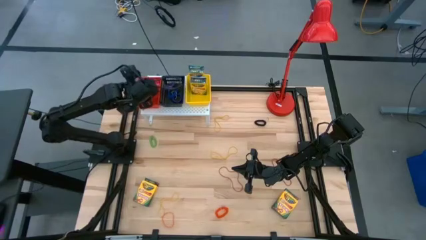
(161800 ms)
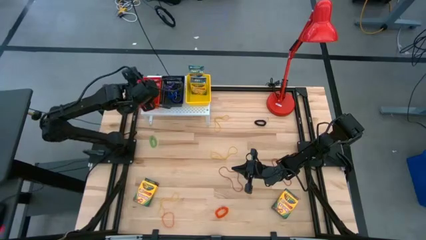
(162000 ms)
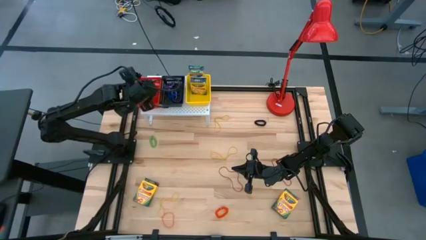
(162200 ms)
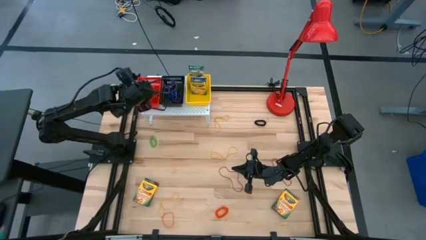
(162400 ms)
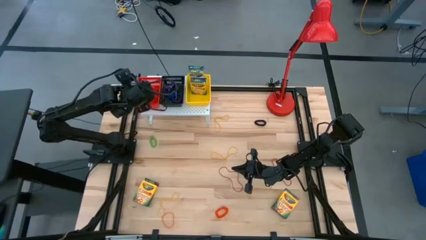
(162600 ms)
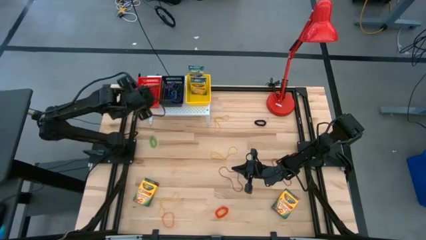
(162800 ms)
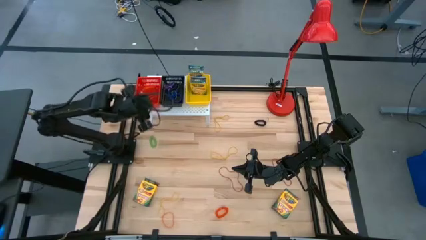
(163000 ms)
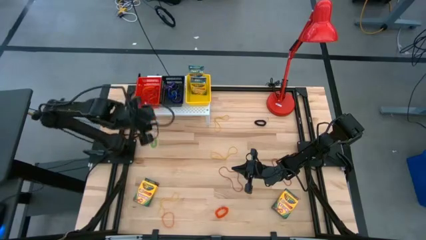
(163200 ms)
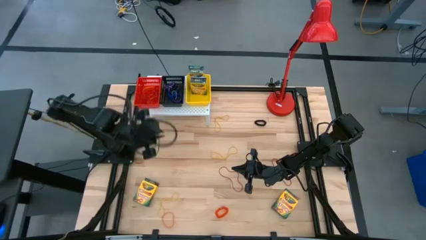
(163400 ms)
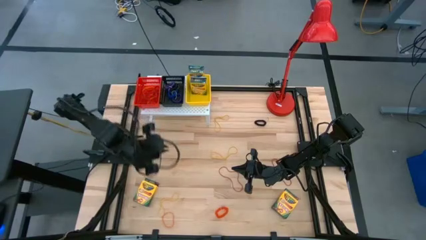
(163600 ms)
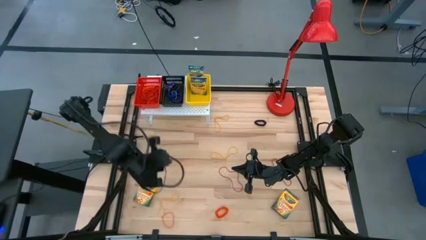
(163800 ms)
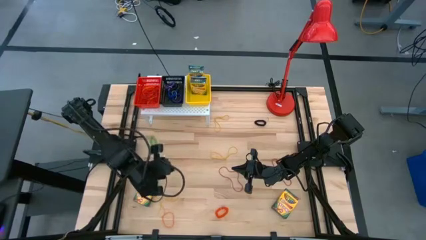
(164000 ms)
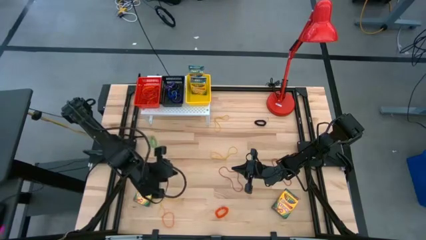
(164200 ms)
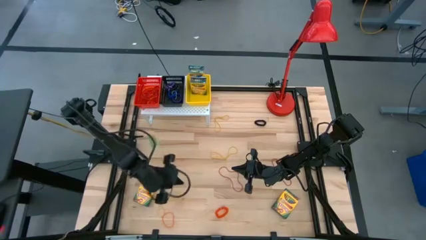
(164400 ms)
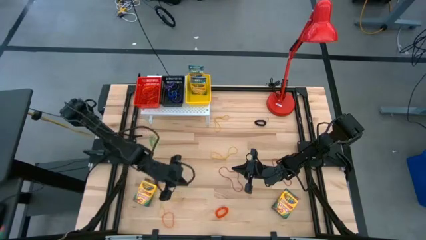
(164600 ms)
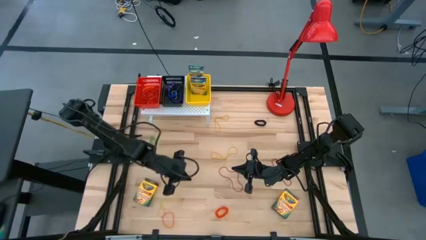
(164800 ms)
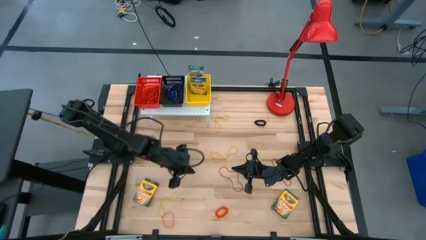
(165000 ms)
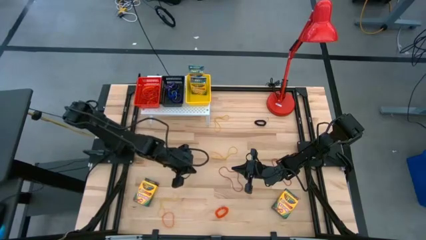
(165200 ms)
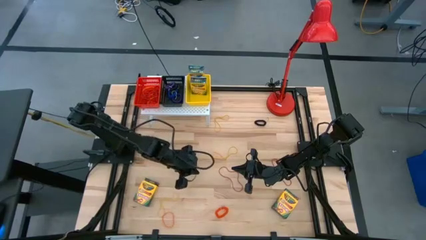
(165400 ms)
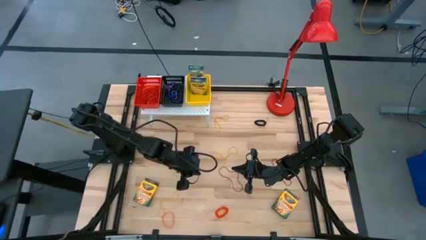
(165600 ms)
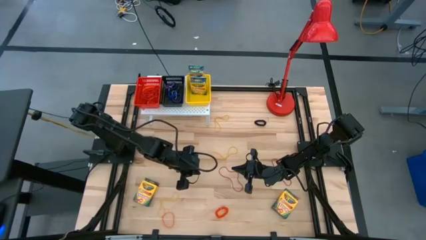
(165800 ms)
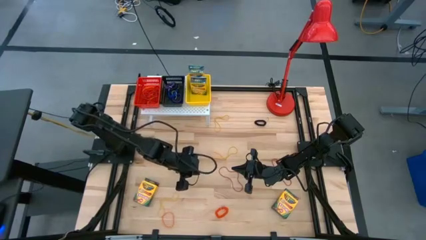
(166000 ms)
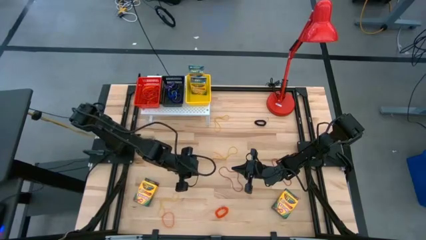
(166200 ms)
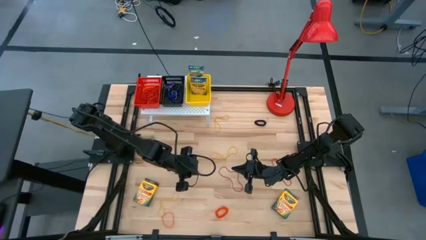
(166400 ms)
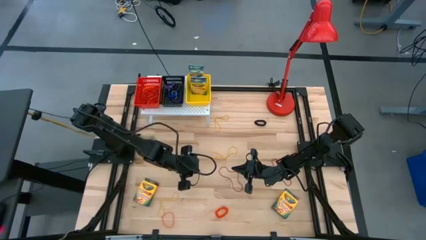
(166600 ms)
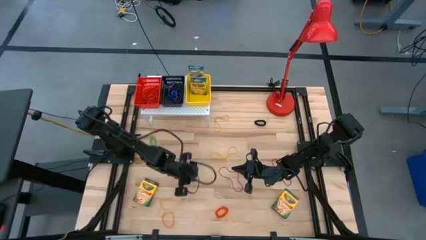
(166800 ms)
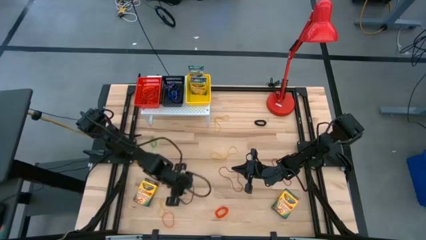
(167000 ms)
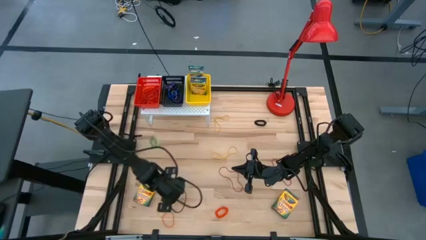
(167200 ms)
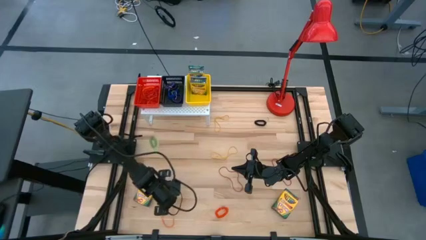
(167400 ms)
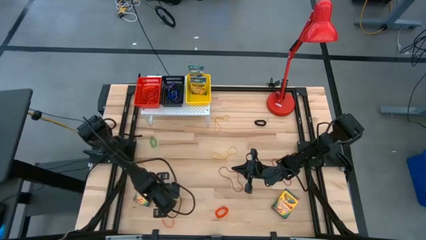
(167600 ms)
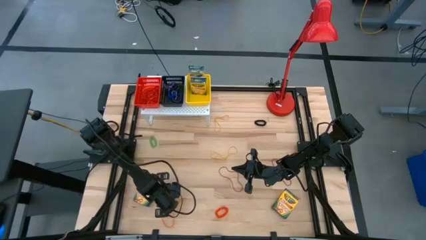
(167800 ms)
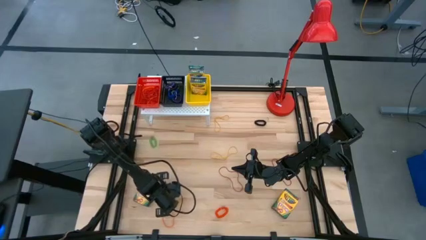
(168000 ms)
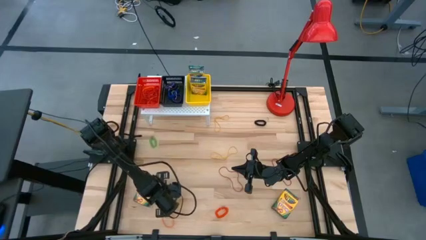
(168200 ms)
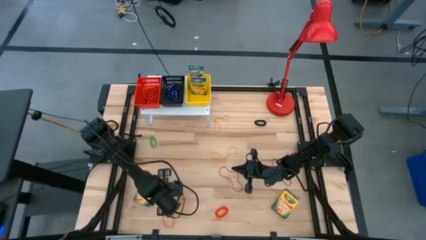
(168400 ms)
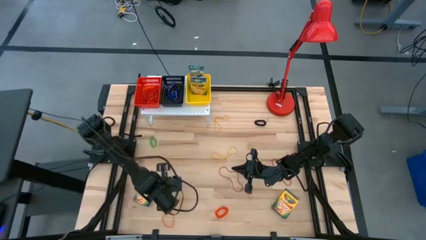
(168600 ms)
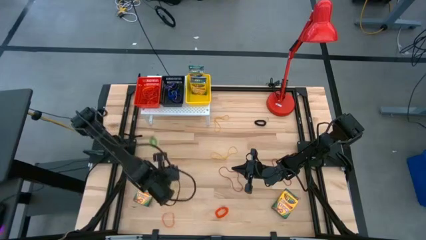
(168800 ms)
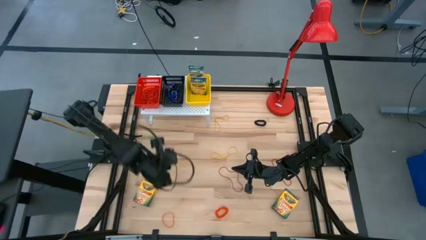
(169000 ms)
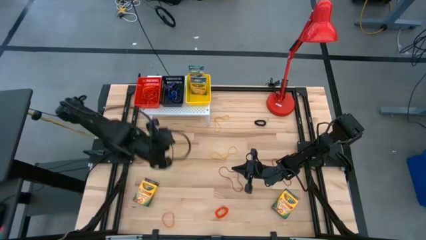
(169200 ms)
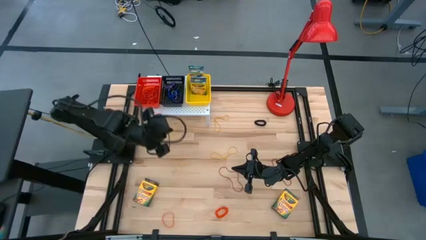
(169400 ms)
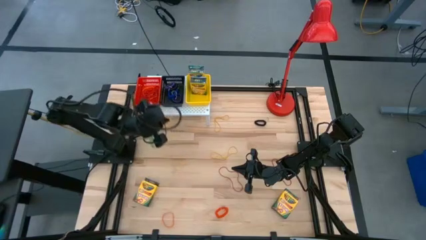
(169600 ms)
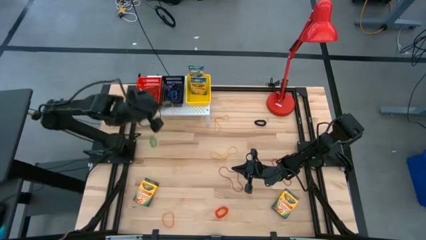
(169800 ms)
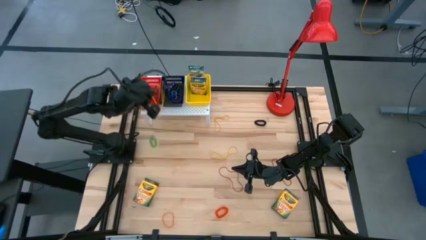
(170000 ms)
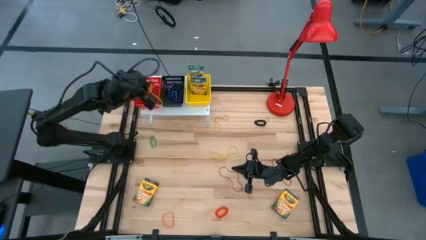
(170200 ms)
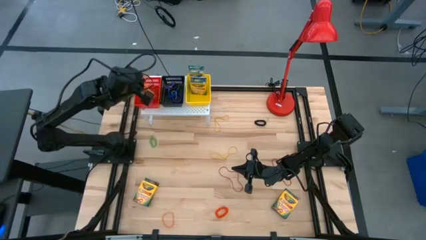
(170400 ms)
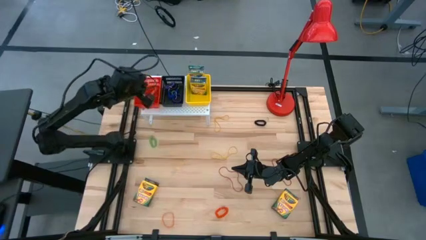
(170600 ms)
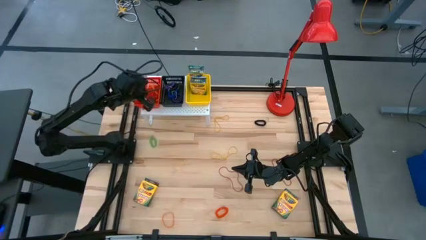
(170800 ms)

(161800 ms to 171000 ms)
Task: Pick & Place Office Desk Supplies
Put the yellow rubber band into the red bin on the shelf

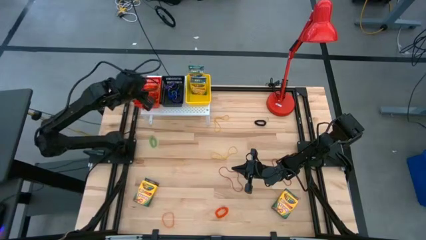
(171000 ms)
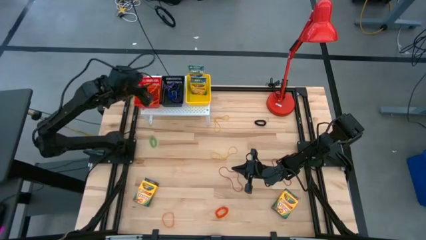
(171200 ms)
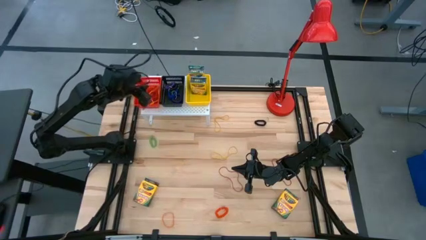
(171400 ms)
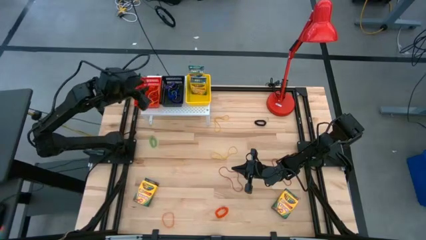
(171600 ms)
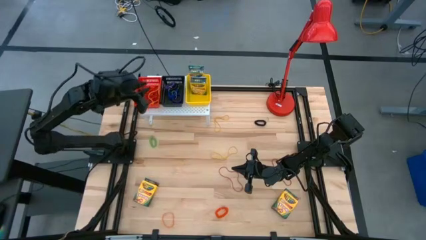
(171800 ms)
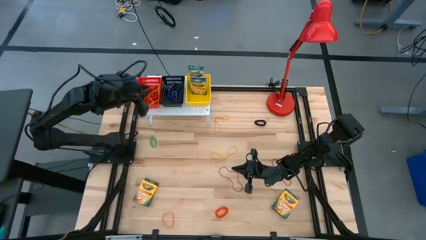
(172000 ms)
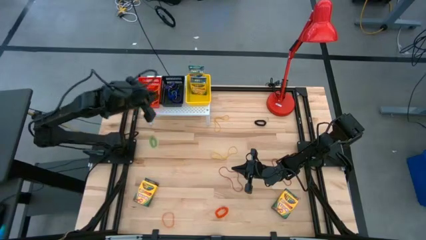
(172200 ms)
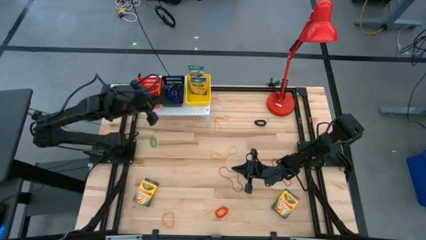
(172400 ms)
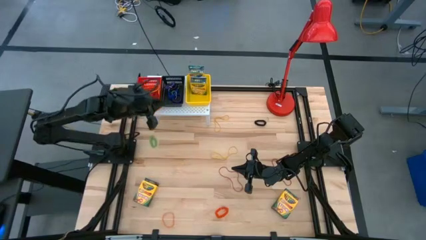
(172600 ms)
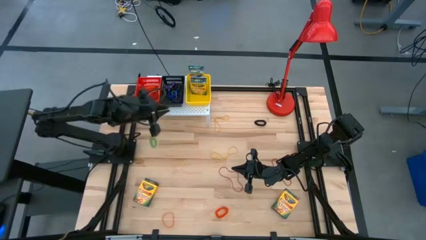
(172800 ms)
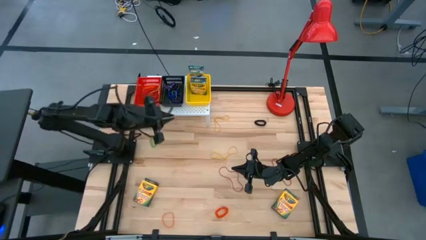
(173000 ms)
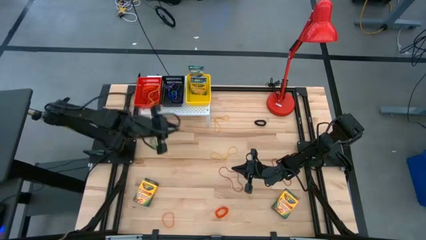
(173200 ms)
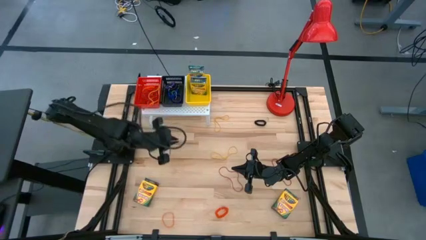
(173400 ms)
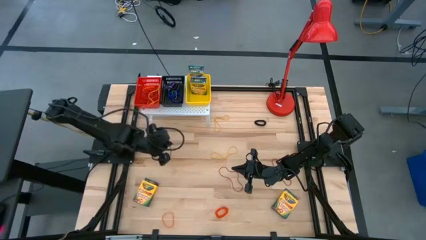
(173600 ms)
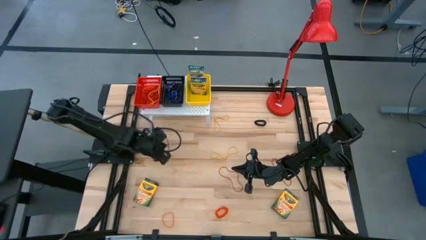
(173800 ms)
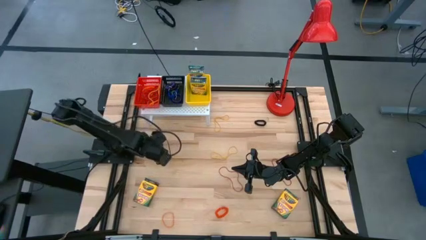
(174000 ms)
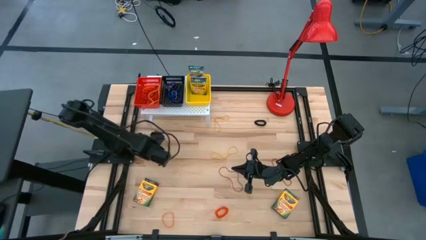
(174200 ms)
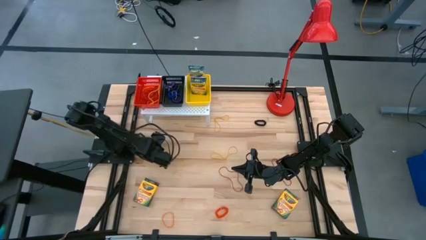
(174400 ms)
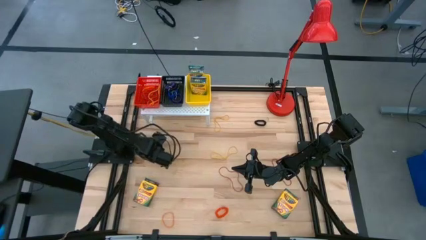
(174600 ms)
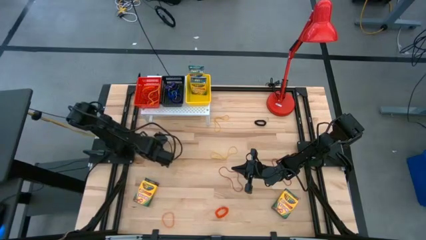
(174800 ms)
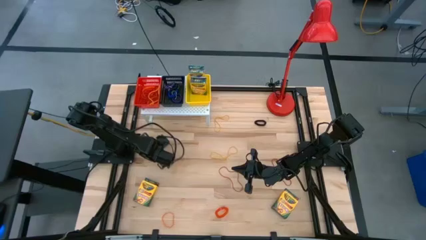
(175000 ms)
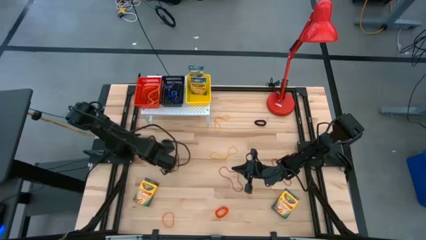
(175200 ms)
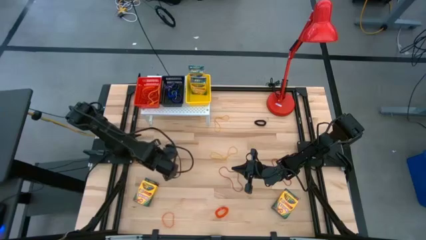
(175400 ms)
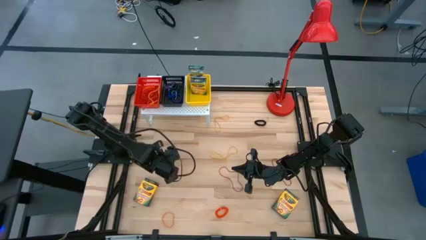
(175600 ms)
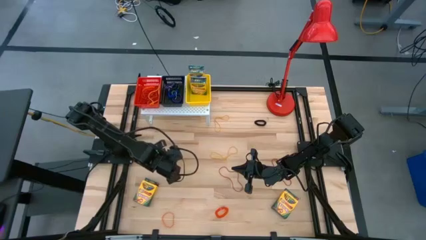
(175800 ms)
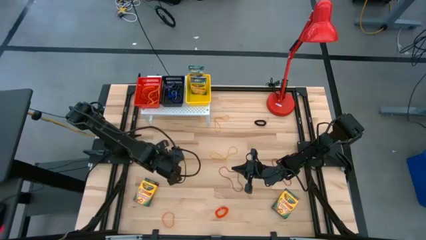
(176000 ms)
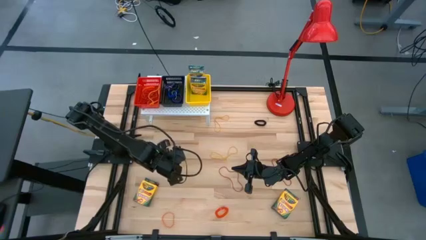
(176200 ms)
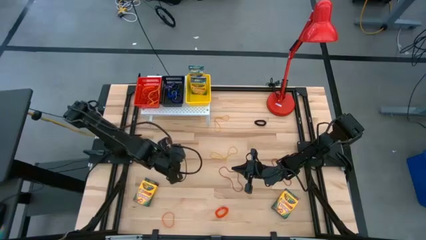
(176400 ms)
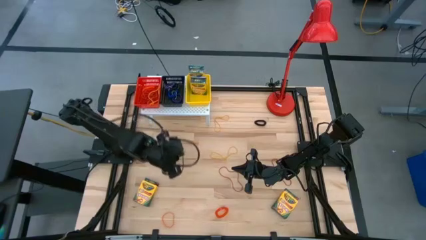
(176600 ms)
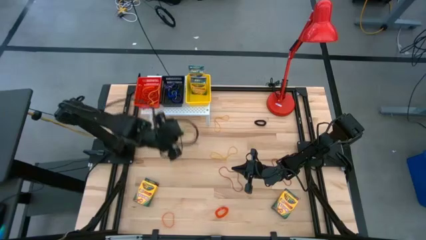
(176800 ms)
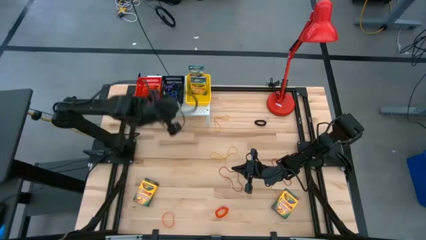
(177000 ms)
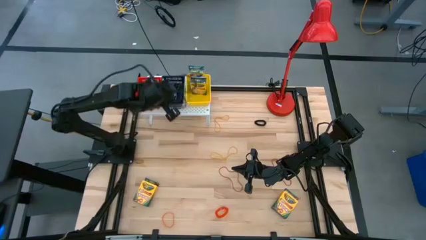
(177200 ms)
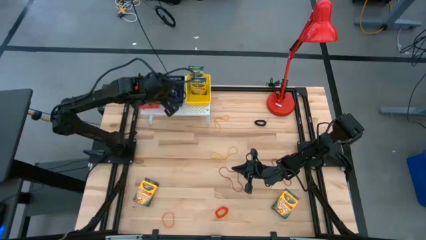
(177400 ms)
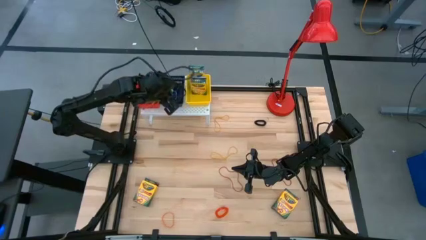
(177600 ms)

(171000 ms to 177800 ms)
Put the green spring keychain into the black bin on the shelf

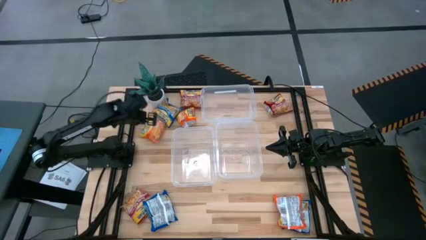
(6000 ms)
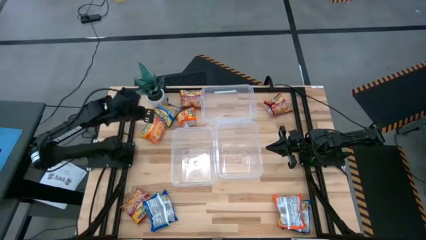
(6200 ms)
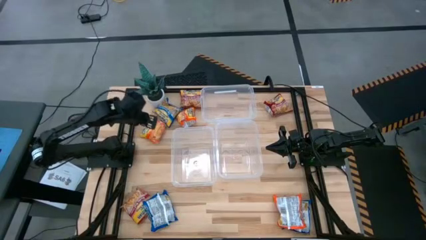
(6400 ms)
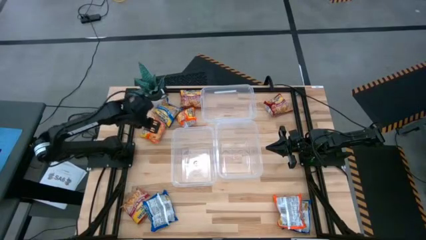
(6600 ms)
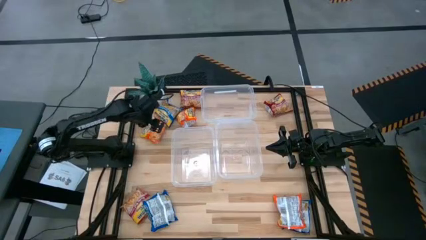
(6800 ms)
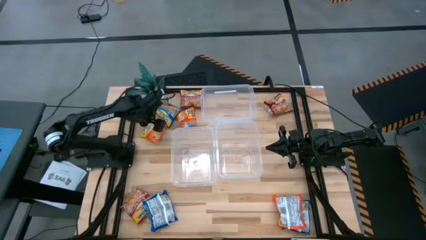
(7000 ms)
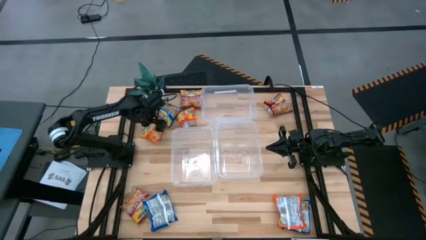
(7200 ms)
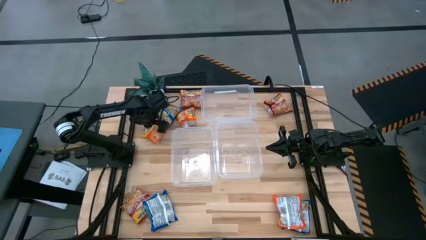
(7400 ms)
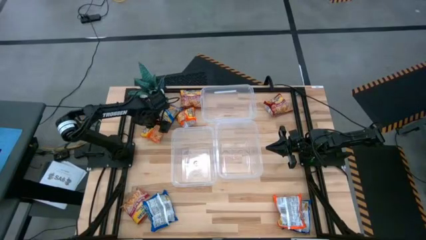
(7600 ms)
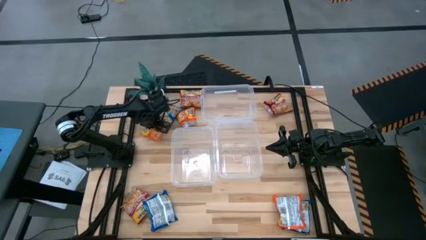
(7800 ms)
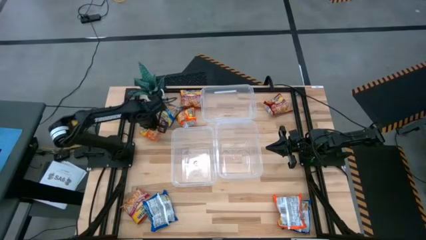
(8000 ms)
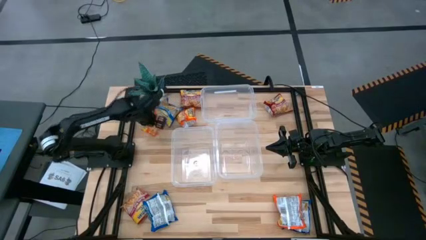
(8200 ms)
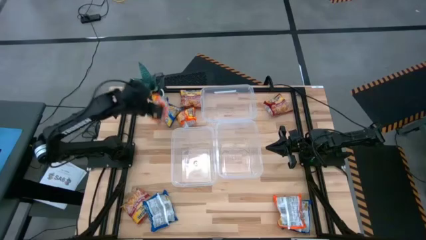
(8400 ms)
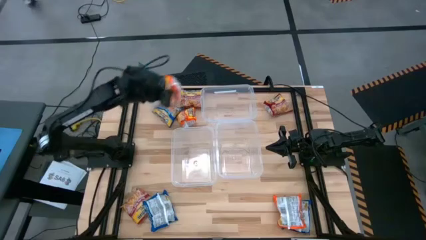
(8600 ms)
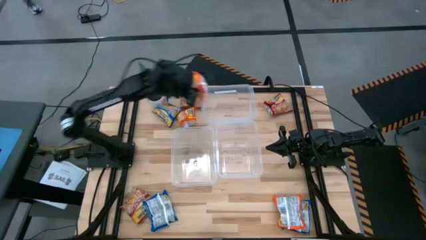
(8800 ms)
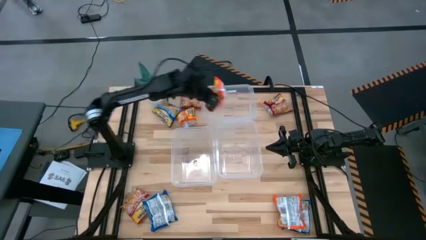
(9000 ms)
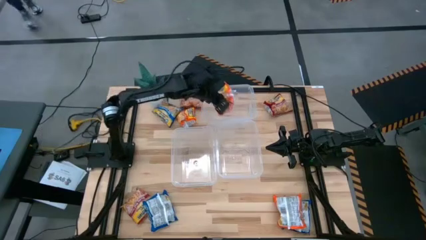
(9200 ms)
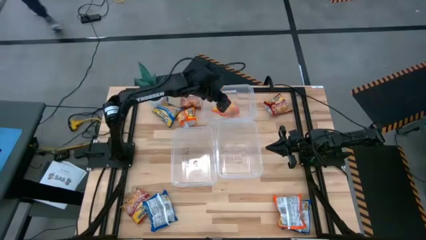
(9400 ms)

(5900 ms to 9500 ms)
Task: Sort Maruchan noodles
Put the top left orange noodle pack into the top transparent bin
